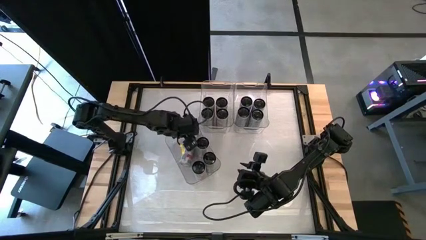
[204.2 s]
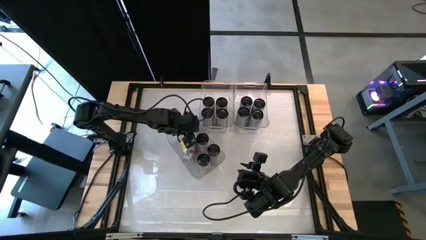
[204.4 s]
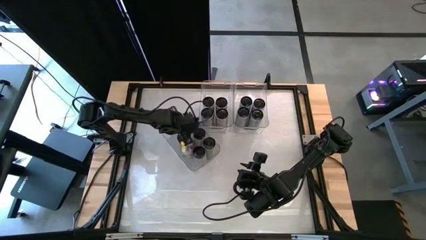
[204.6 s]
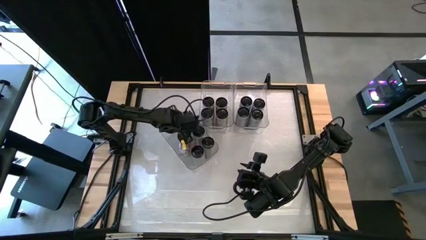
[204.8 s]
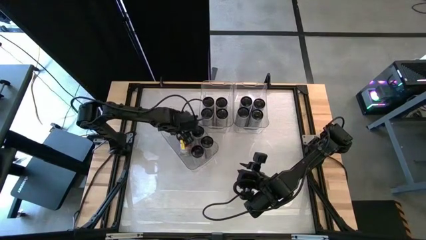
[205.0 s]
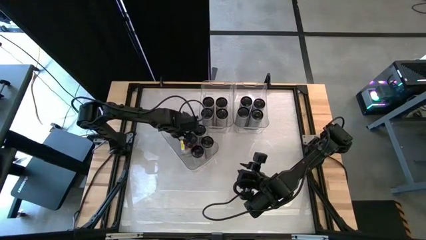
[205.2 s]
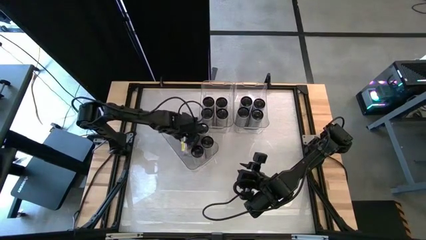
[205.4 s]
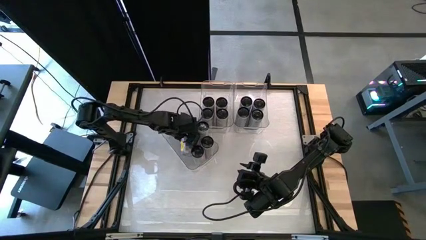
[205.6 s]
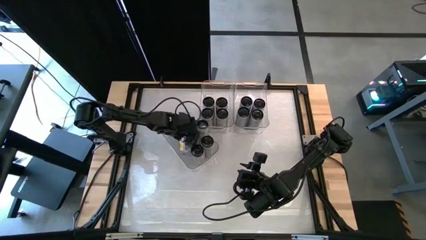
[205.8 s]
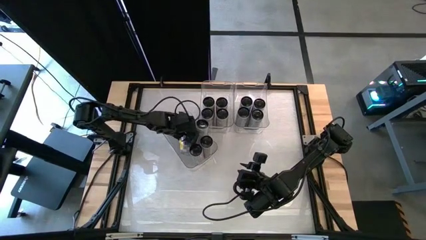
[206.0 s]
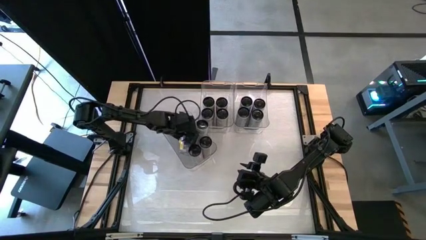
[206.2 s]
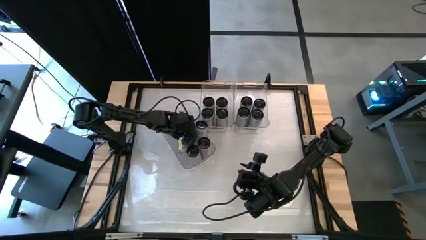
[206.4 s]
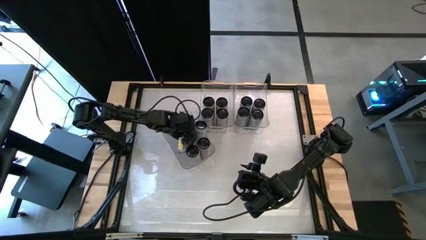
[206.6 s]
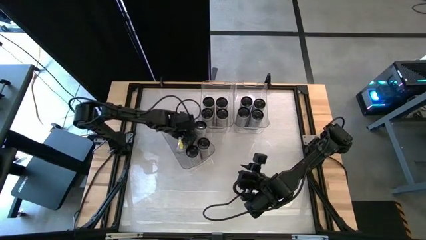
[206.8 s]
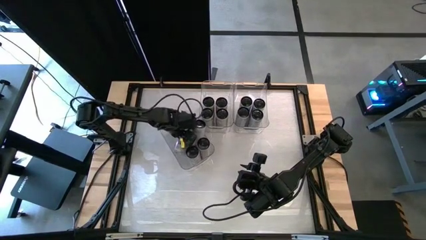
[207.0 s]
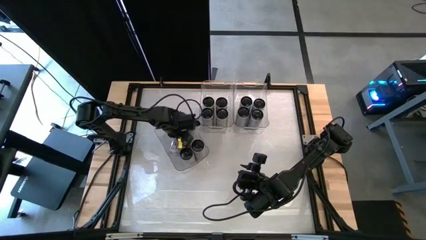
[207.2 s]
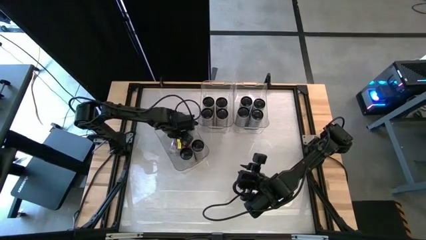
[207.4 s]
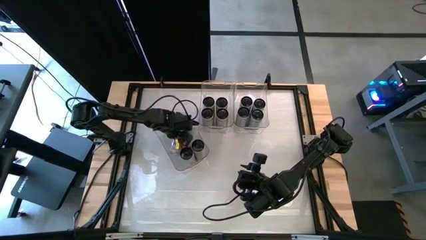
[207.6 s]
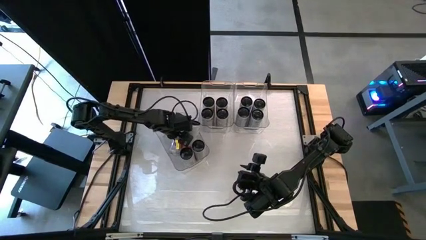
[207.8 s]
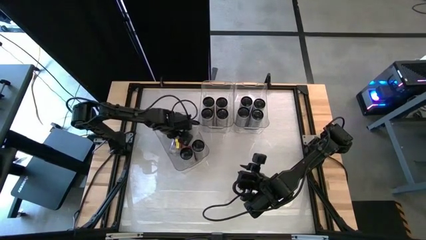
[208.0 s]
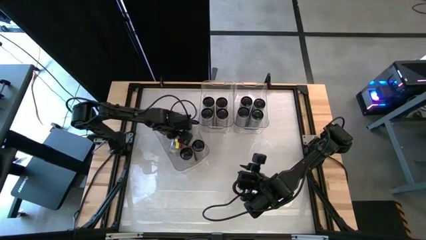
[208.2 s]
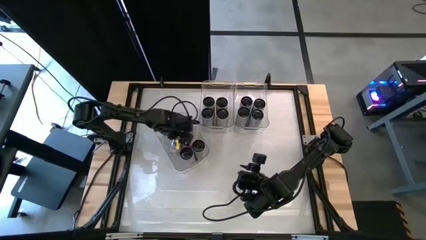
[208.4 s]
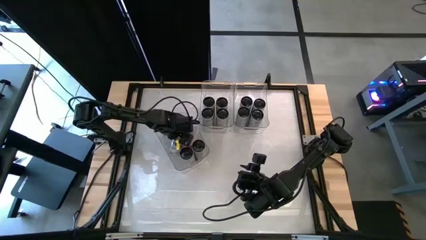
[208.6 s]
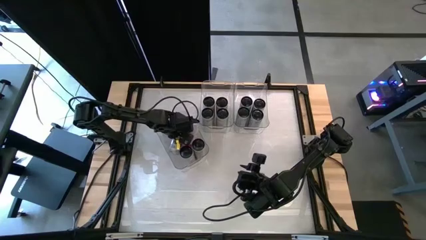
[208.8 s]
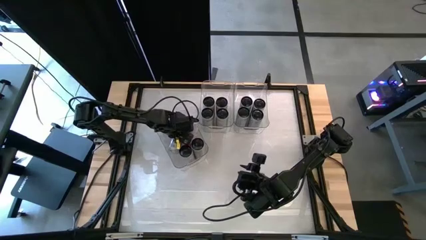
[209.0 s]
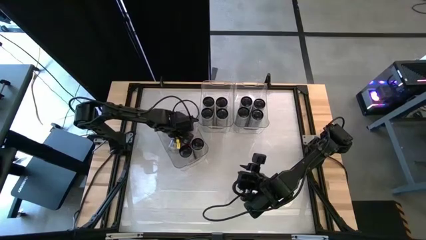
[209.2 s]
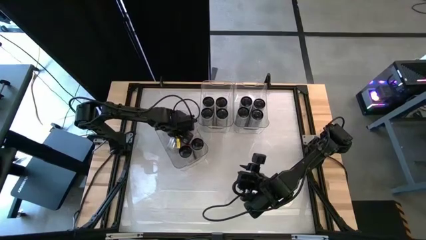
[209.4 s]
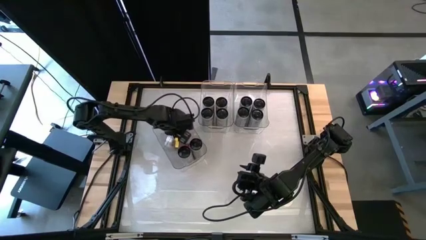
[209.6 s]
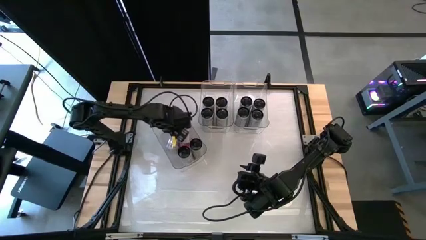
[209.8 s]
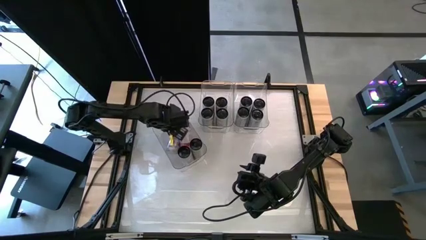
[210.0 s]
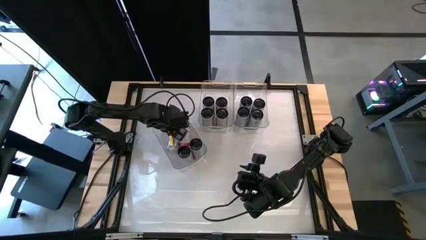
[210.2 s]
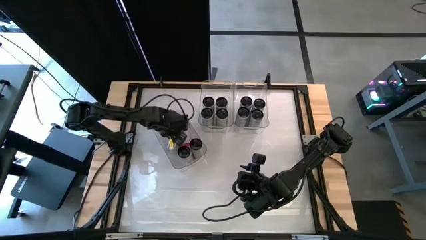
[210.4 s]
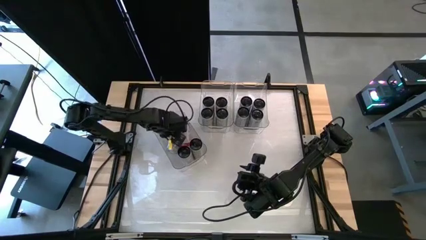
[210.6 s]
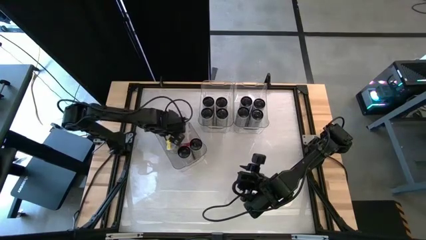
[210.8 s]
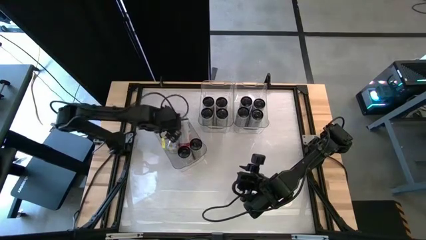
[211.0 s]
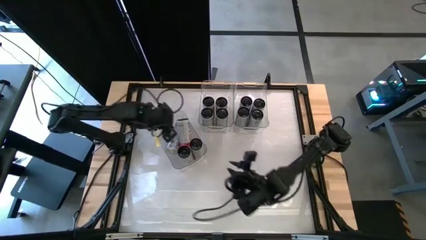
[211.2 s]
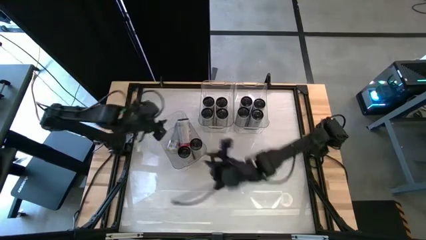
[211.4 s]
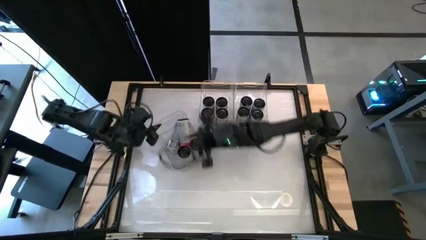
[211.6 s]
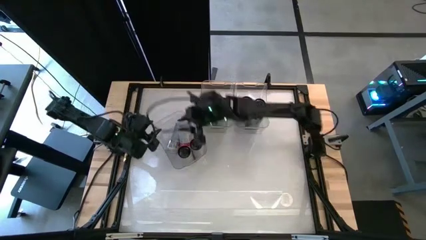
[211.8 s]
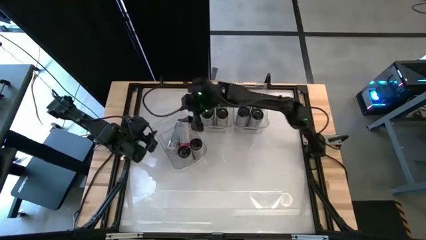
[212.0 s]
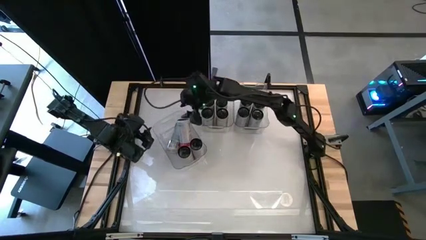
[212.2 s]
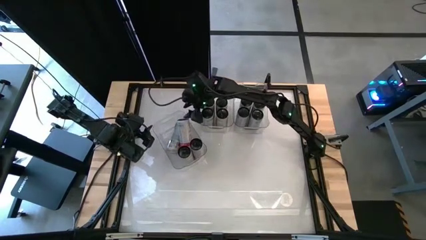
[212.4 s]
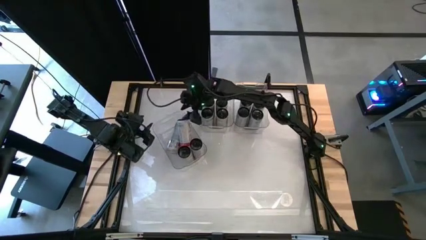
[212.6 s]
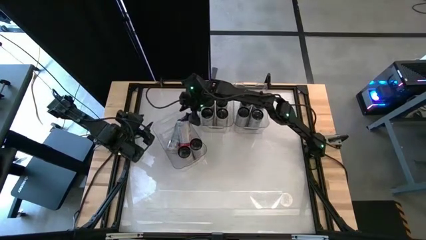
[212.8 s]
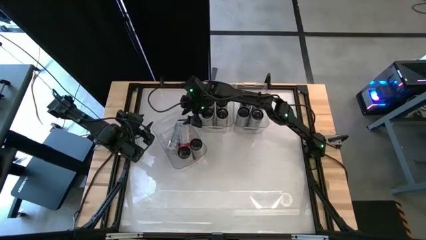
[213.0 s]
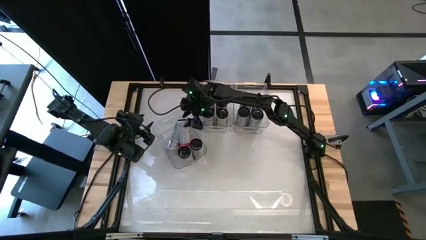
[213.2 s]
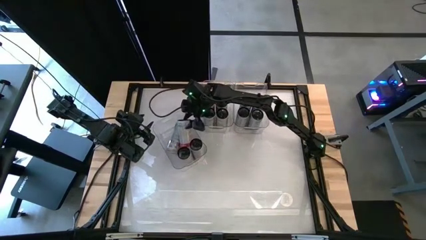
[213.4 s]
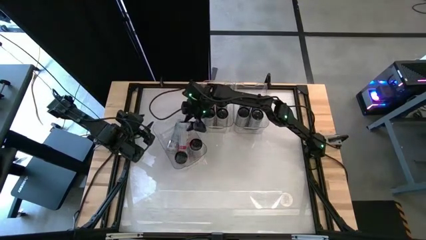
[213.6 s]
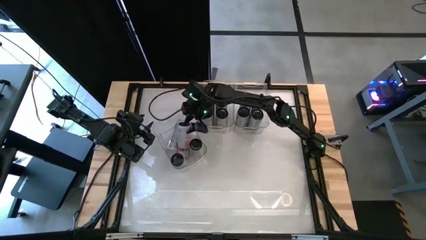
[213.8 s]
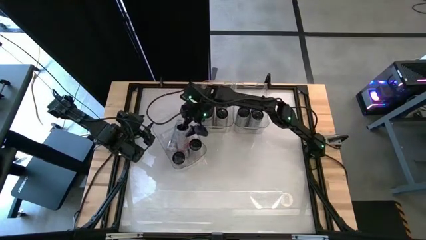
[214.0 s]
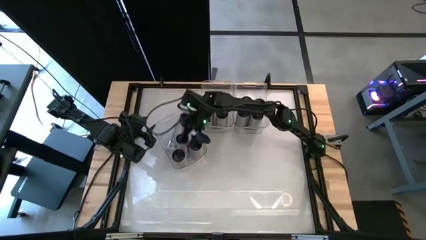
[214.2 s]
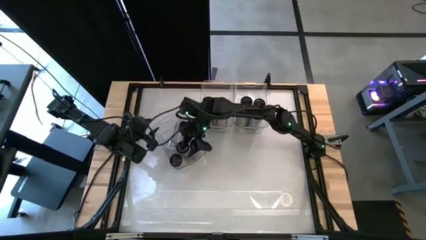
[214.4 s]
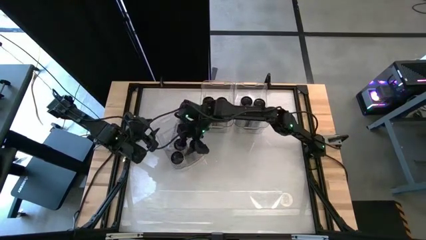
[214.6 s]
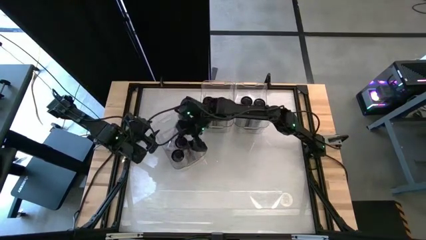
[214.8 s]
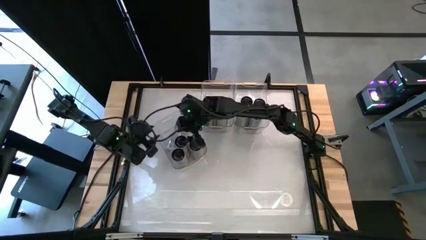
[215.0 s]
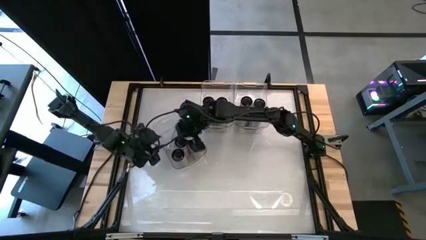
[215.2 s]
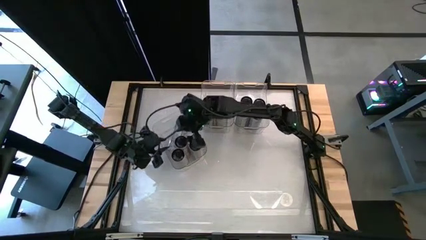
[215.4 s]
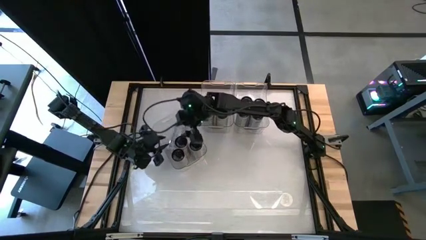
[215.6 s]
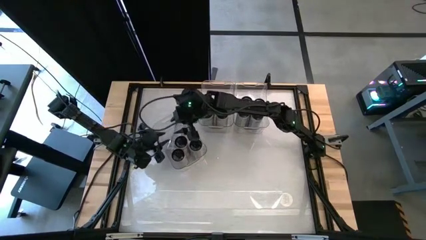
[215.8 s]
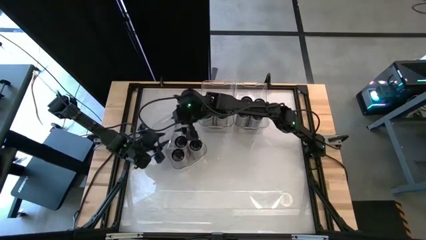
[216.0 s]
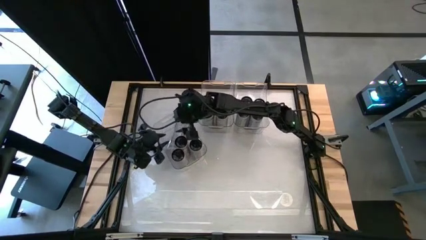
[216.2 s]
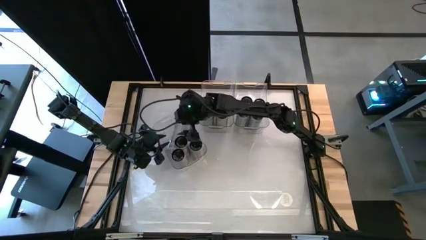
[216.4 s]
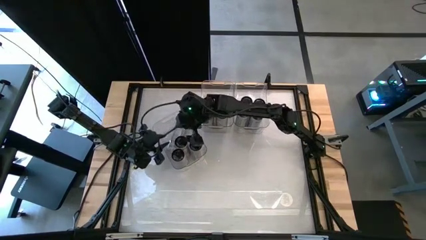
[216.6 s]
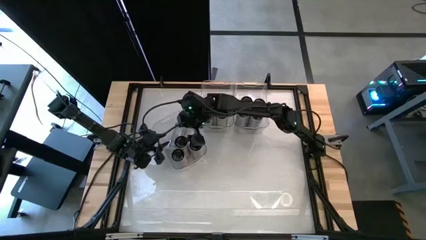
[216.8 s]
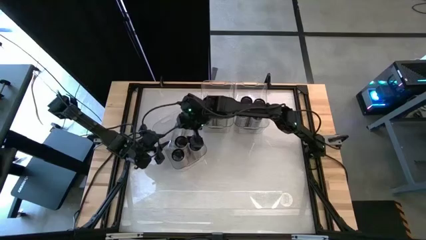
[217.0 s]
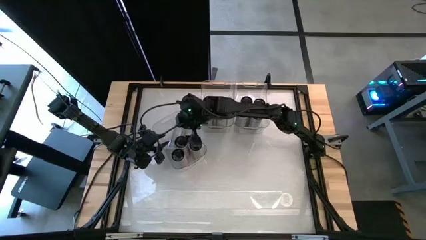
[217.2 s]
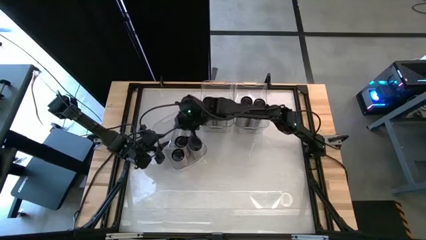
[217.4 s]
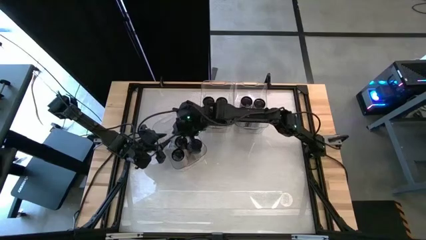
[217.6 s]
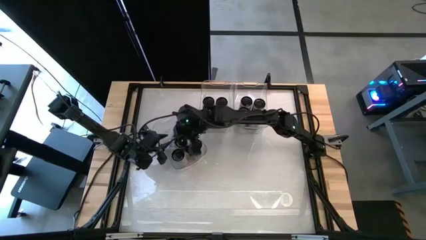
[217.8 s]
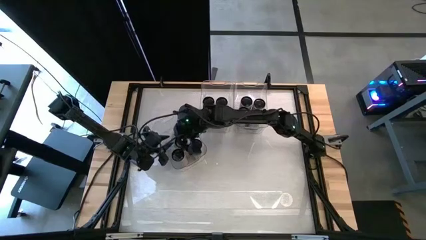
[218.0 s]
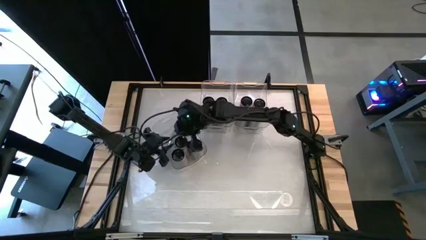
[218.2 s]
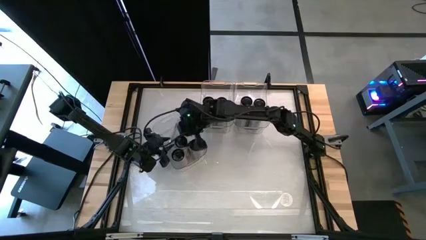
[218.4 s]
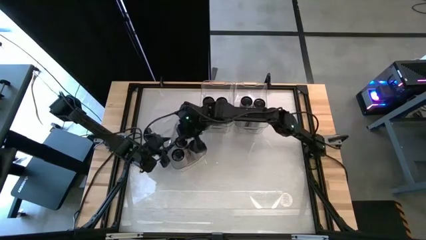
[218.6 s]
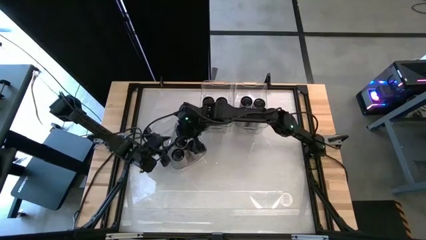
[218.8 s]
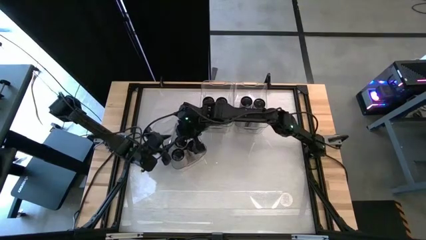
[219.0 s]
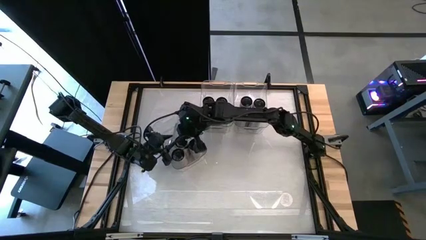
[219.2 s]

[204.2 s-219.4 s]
Task: Sort soda cans
Adjust the white pink soda cans
